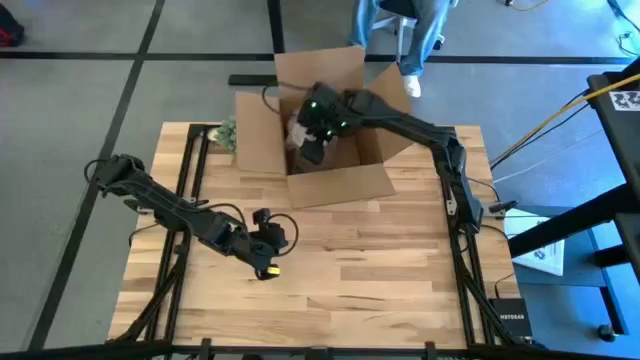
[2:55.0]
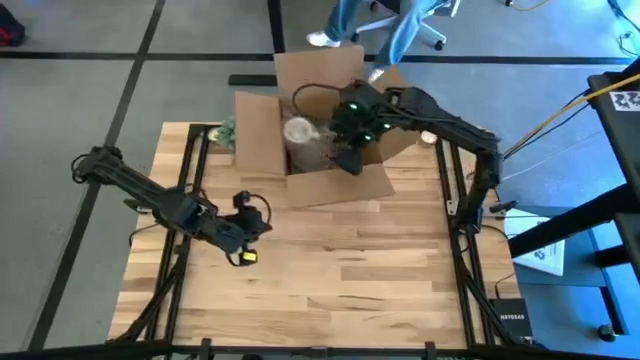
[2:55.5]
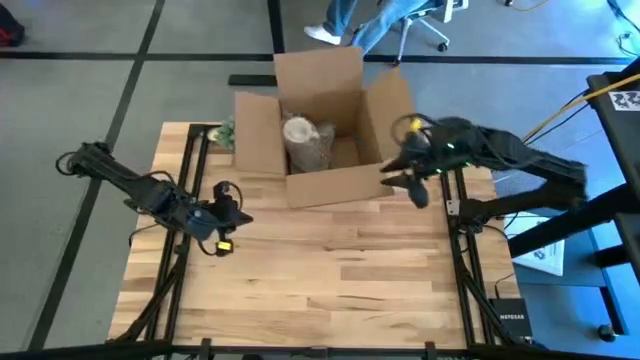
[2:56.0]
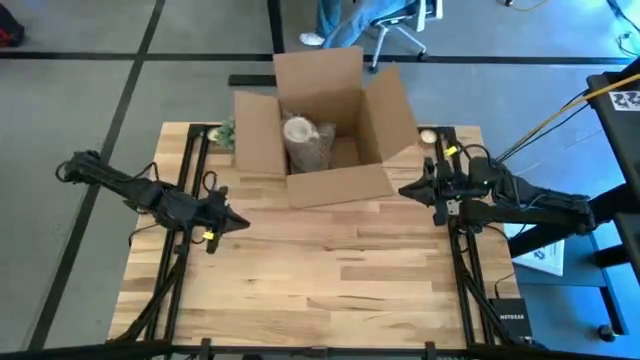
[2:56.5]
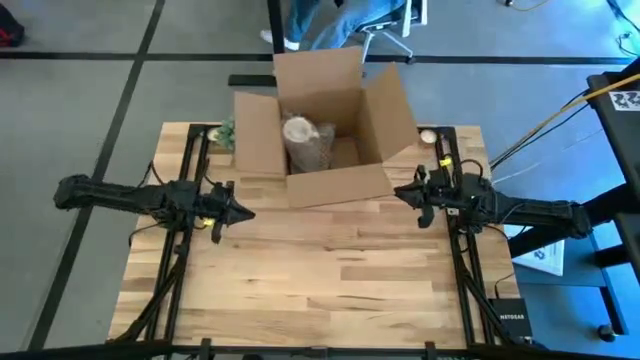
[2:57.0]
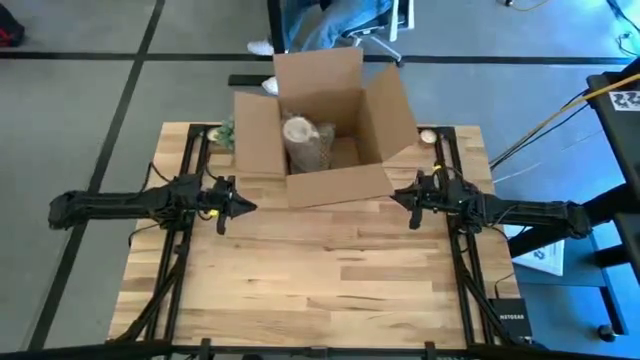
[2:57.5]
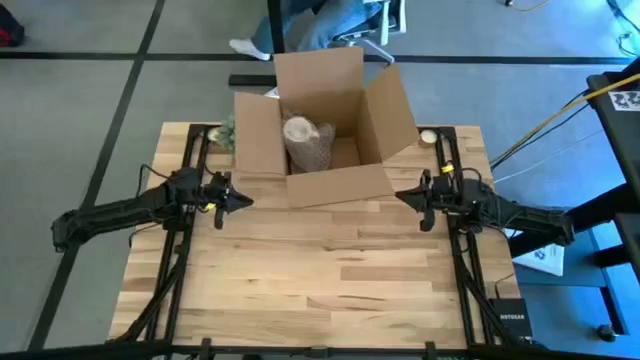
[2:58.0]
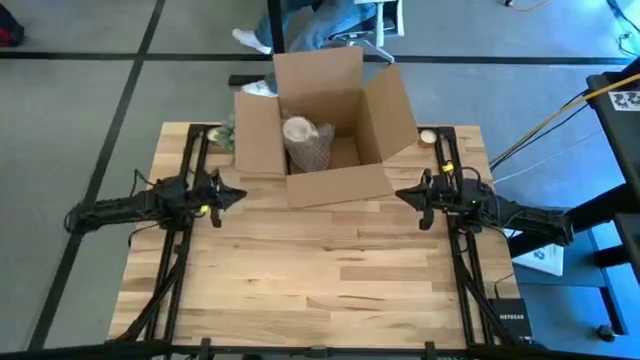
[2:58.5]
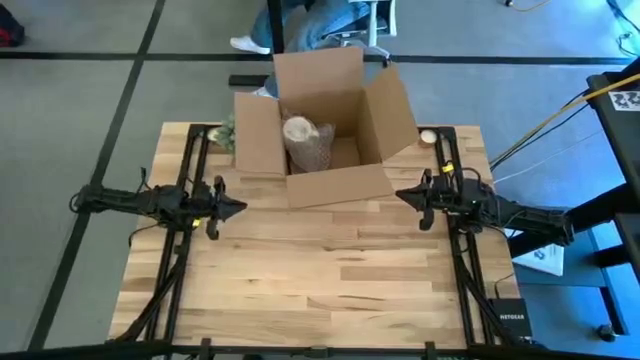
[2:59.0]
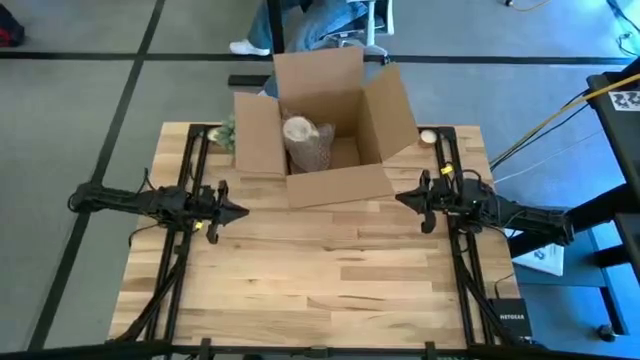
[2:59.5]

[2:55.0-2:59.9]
Task: wrap mug
Return to Home Position

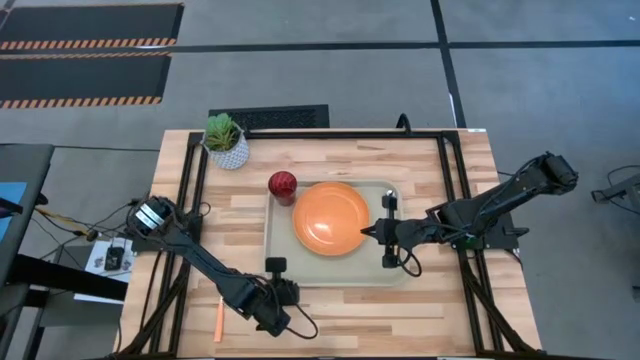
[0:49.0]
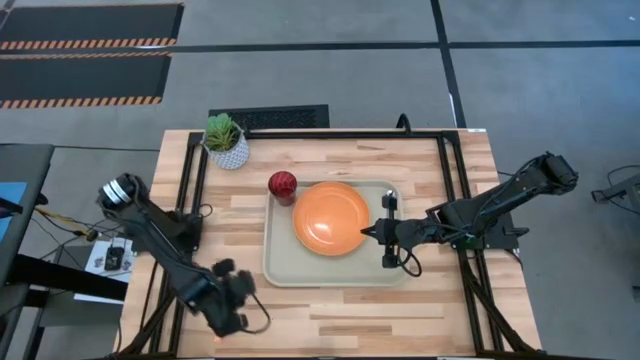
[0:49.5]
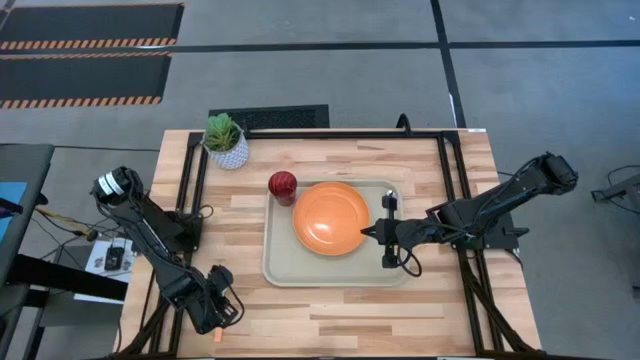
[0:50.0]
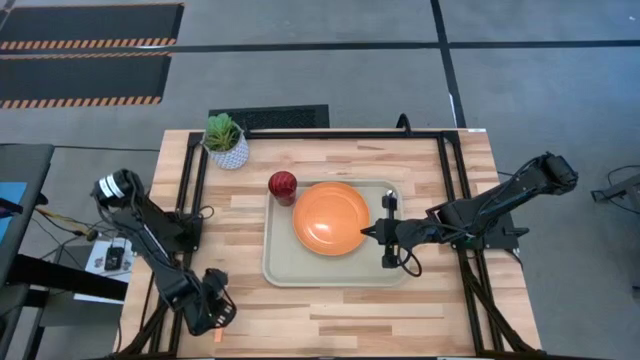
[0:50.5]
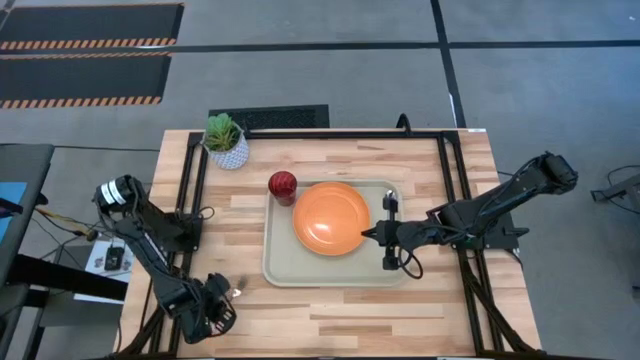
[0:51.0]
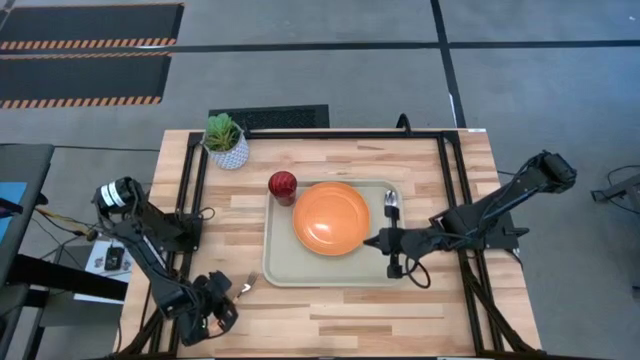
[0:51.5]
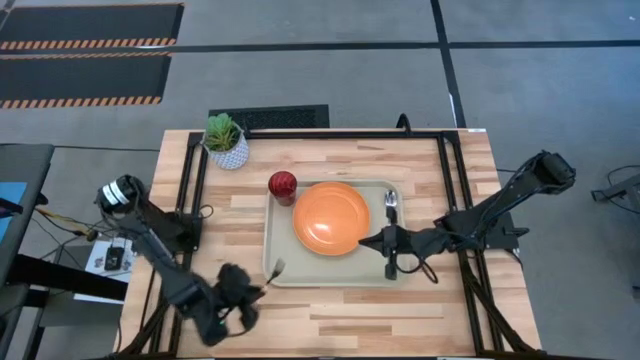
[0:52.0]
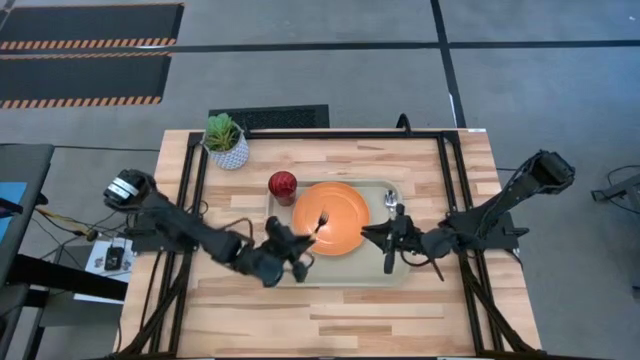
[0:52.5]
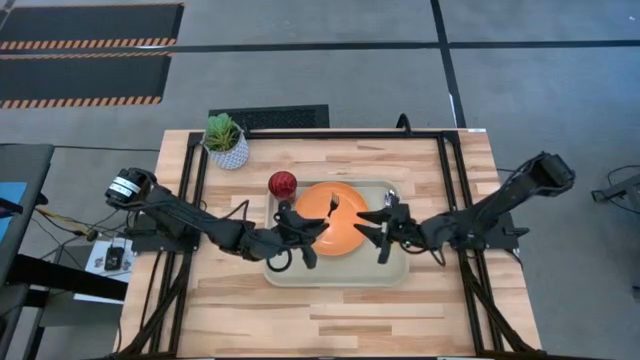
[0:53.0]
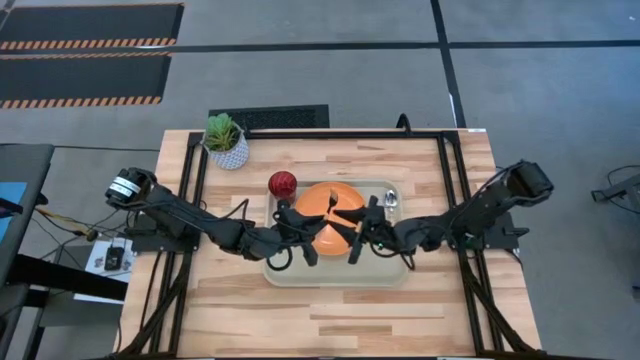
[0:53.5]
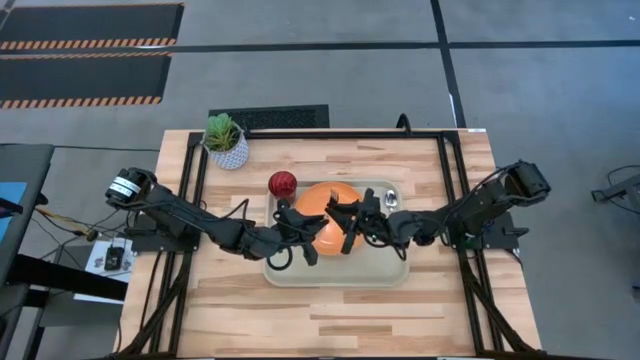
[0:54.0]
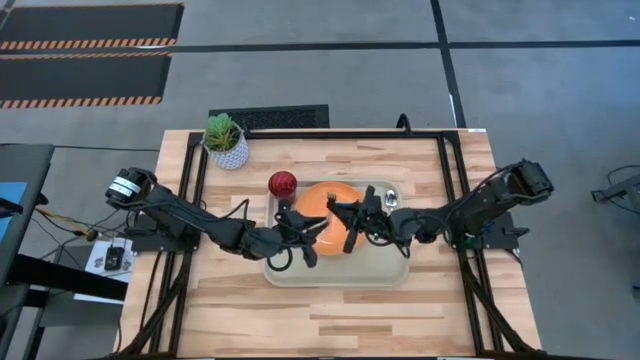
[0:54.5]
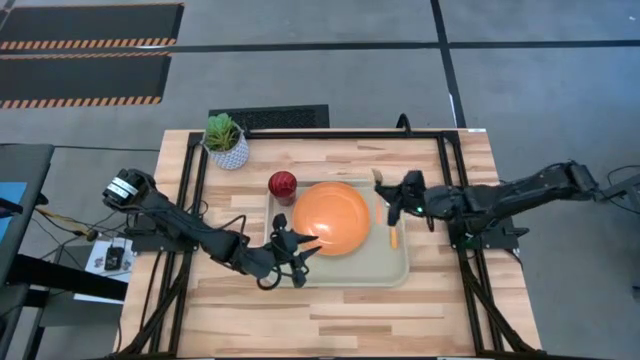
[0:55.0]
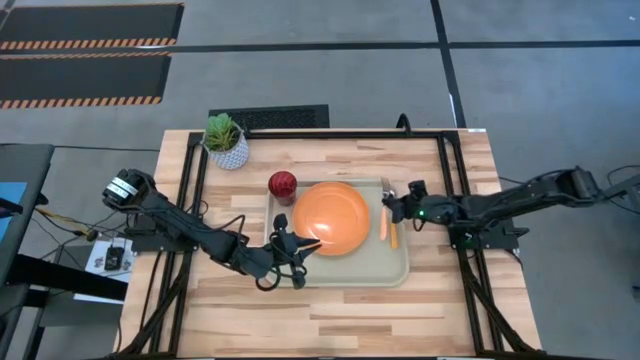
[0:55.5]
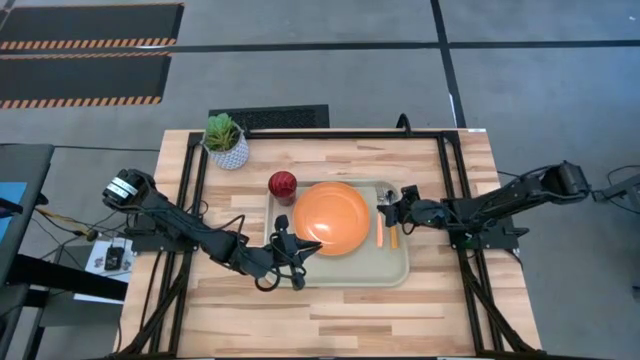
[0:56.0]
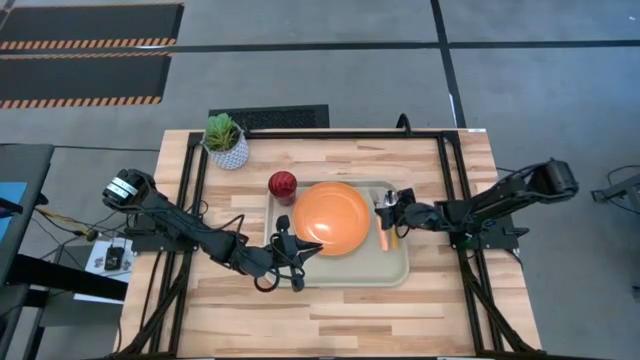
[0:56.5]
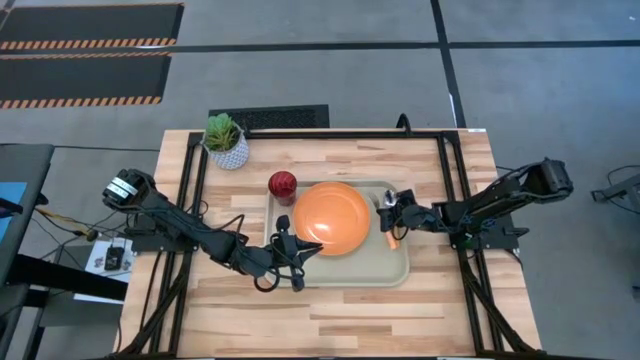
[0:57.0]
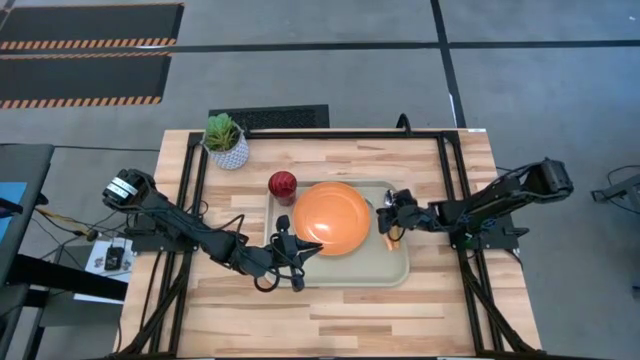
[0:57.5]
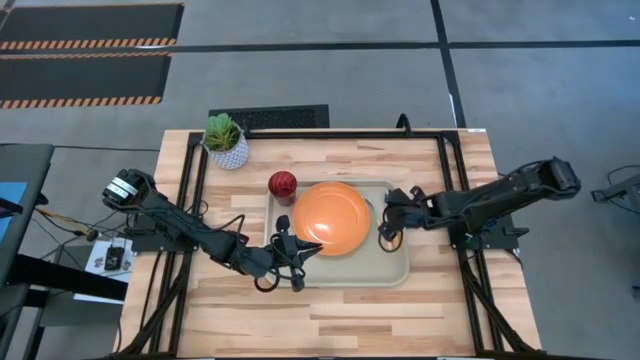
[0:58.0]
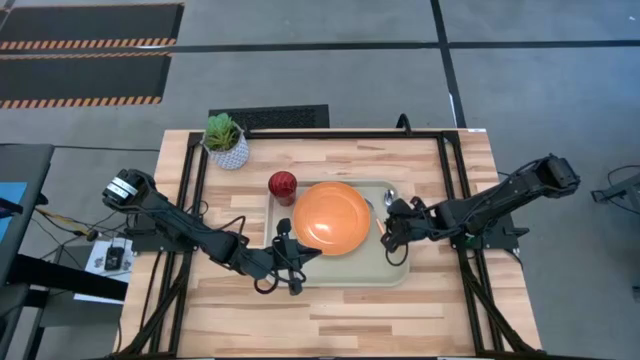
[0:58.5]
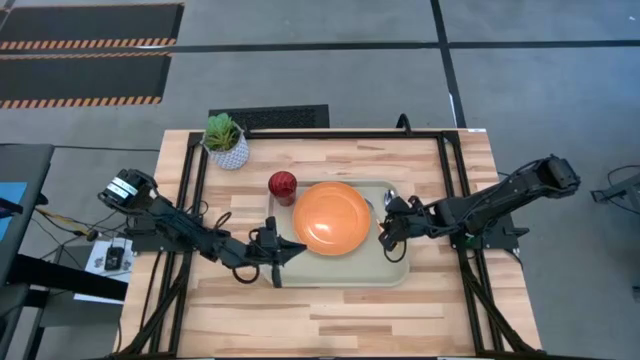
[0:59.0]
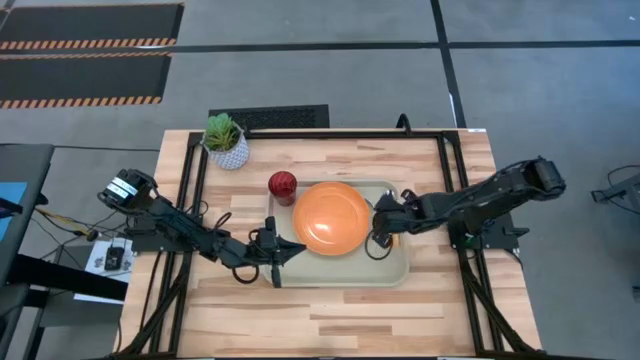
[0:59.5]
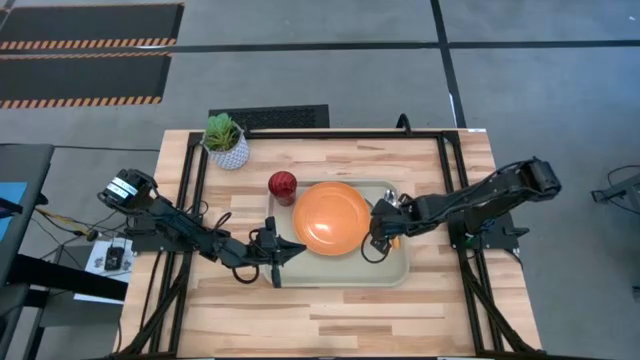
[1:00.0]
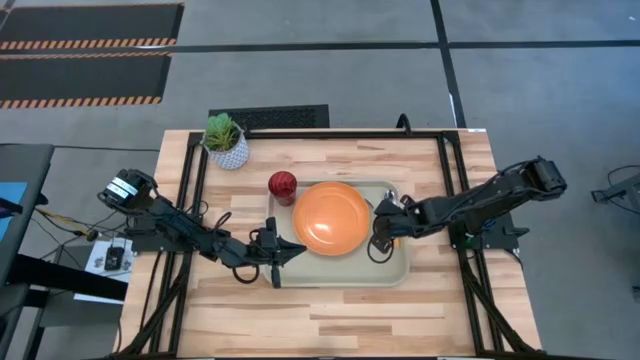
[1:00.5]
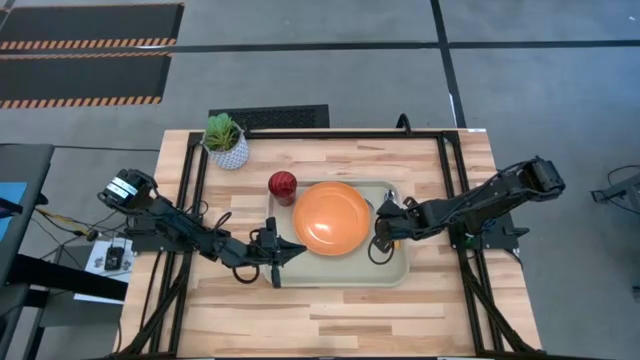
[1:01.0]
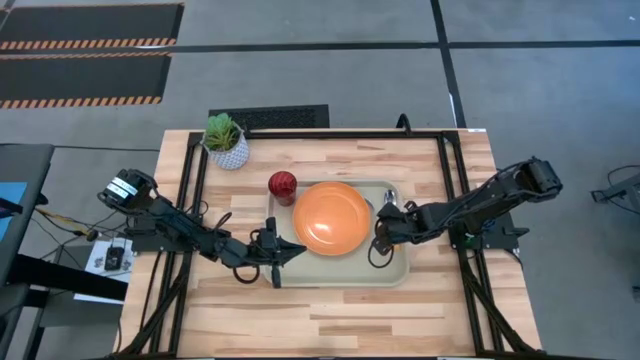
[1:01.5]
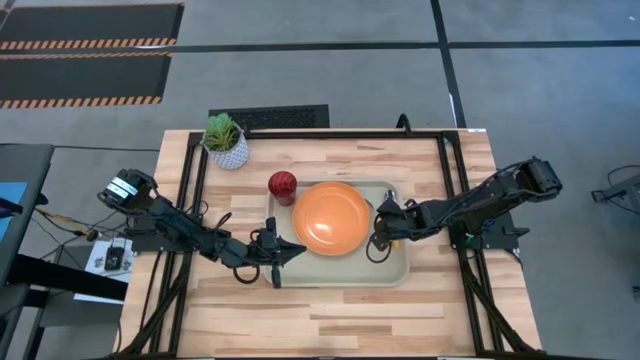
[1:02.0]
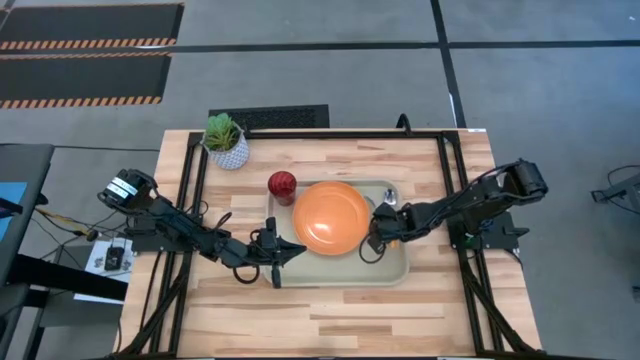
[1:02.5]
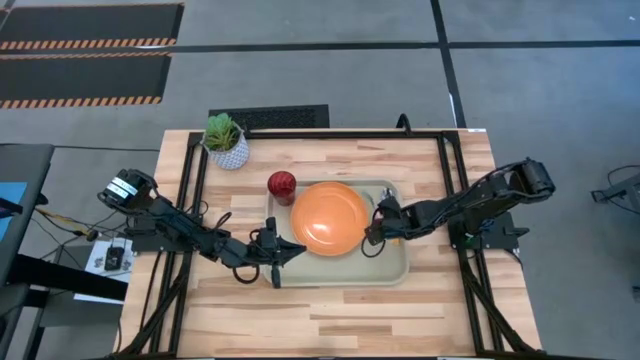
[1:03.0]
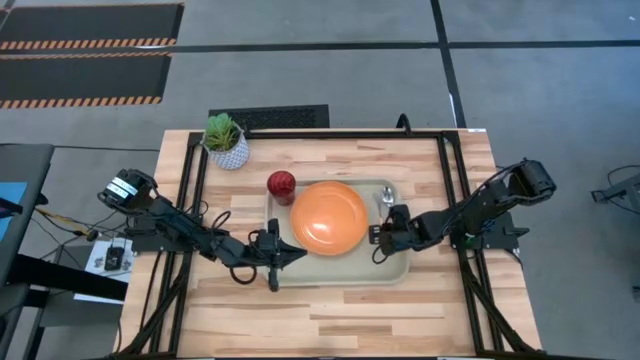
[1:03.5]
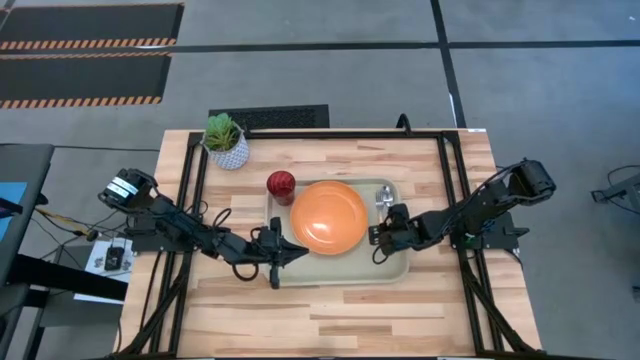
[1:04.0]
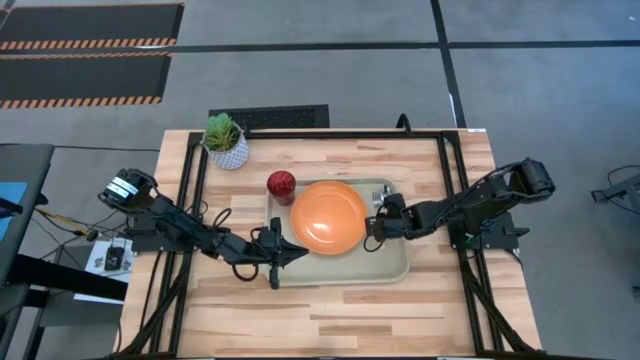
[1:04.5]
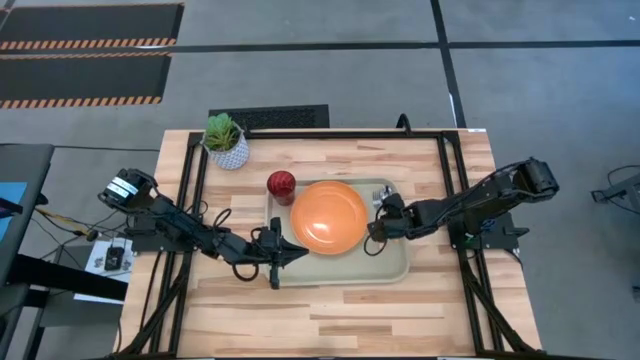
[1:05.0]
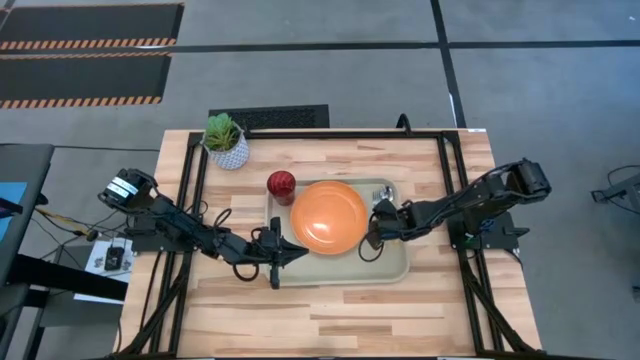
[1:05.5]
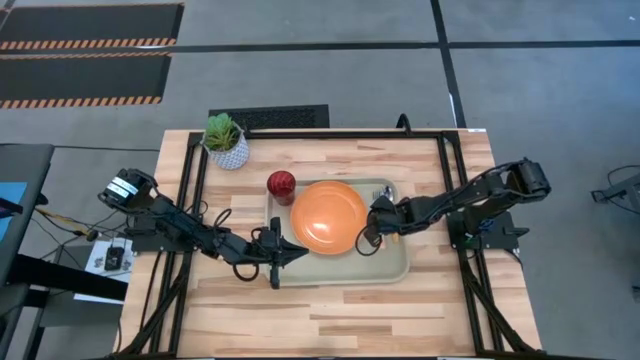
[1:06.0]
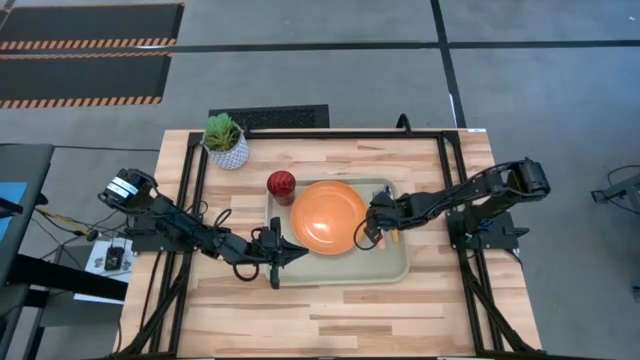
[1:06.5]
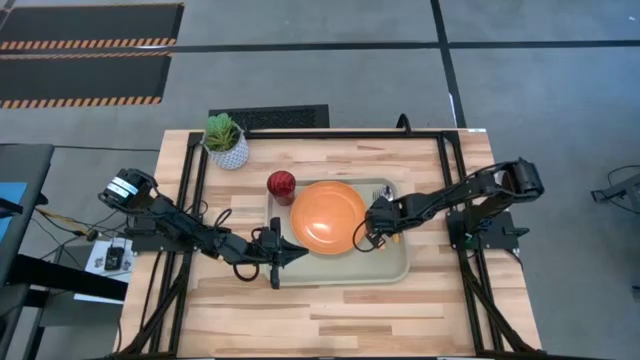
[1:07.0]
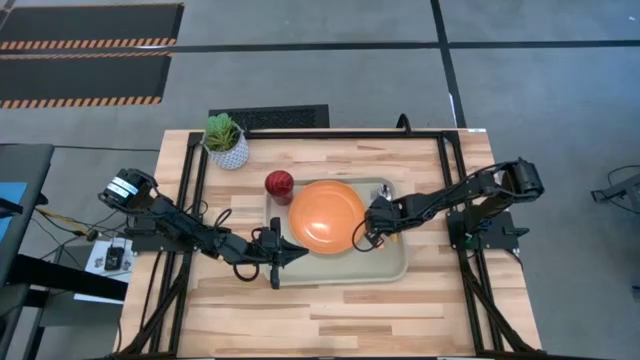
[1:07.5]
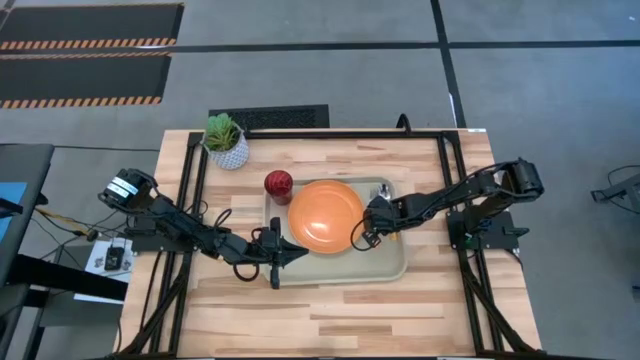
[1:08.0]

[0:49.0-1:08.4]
Task: Pick and place plate/cup/fork/spoon on tray
Put the orange fork on the gray serving tray between the orange plate and the yellow spoon
